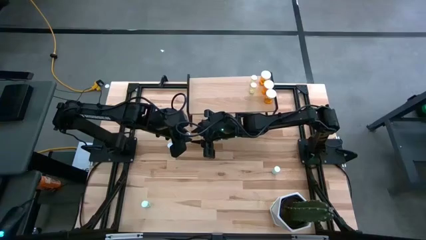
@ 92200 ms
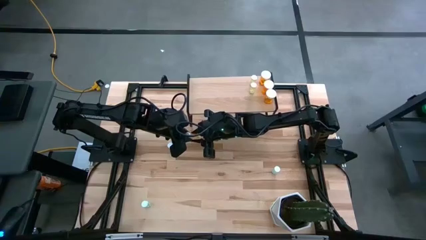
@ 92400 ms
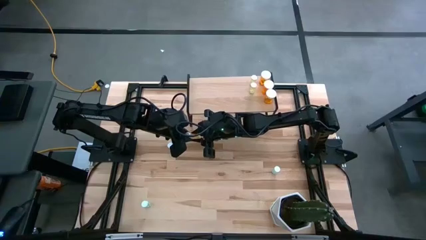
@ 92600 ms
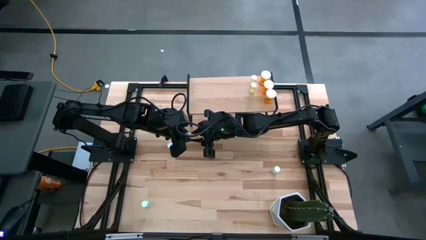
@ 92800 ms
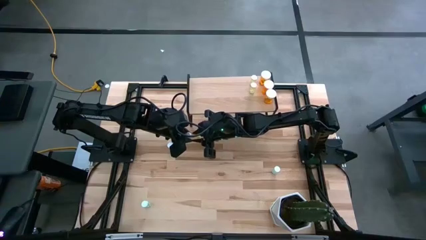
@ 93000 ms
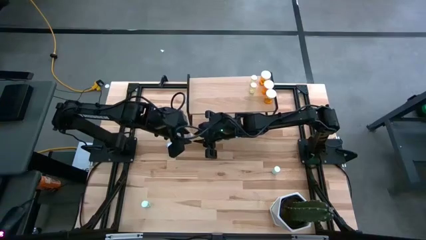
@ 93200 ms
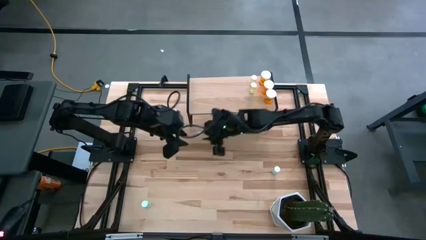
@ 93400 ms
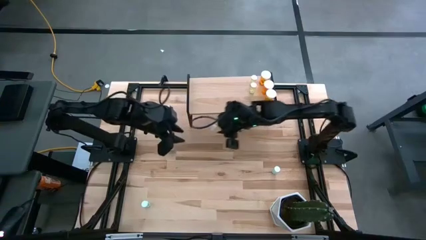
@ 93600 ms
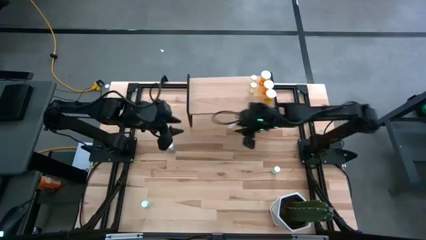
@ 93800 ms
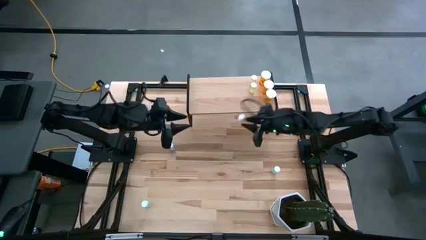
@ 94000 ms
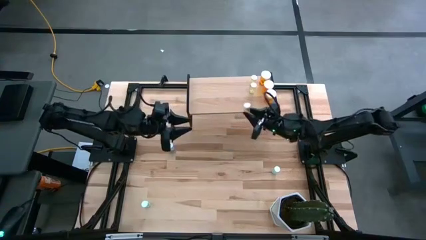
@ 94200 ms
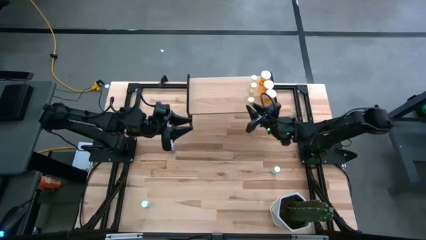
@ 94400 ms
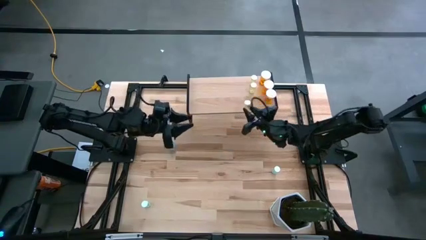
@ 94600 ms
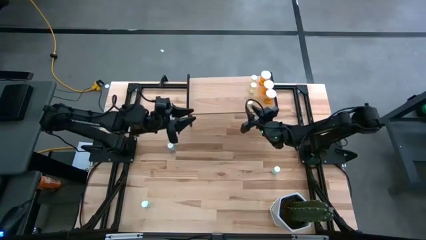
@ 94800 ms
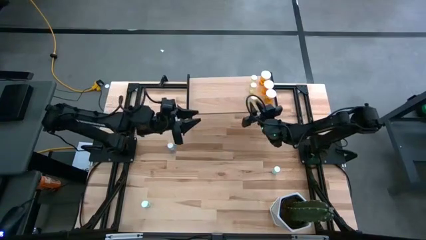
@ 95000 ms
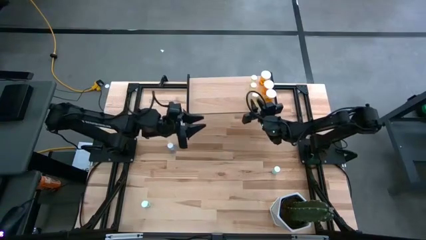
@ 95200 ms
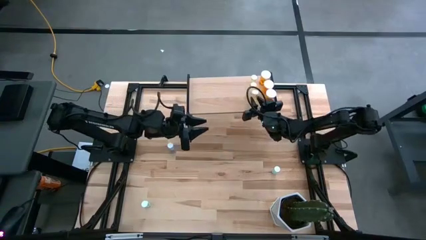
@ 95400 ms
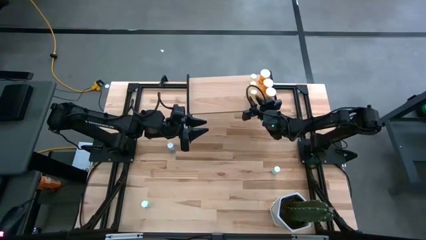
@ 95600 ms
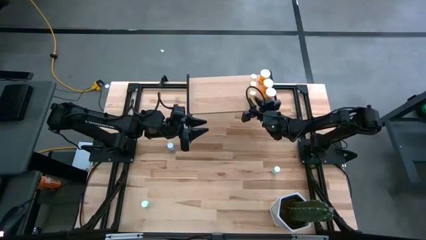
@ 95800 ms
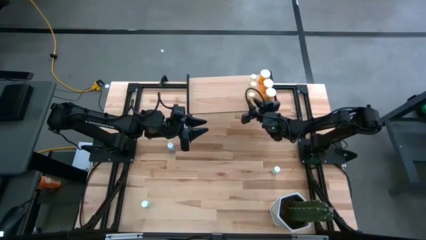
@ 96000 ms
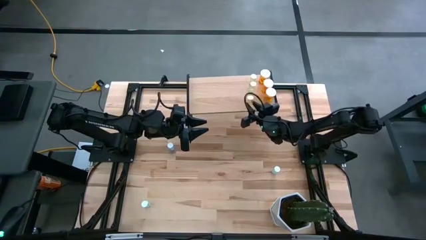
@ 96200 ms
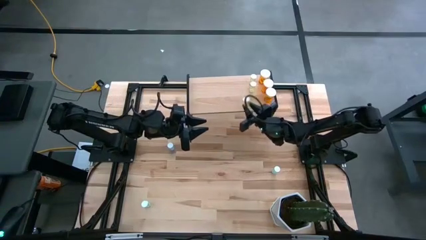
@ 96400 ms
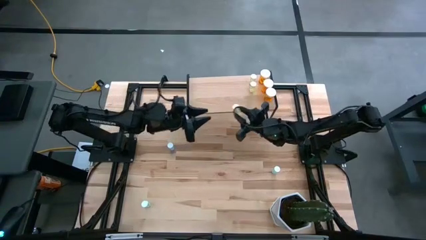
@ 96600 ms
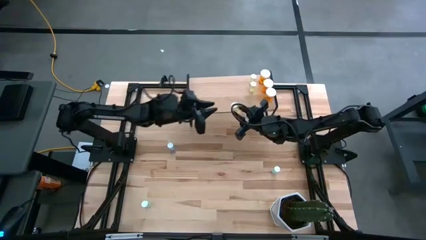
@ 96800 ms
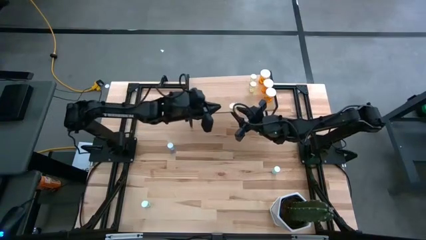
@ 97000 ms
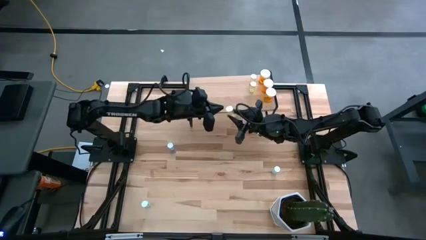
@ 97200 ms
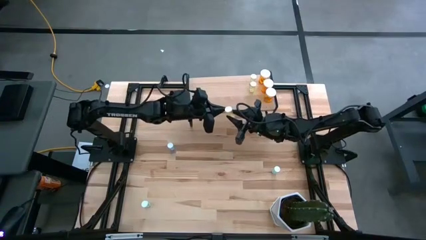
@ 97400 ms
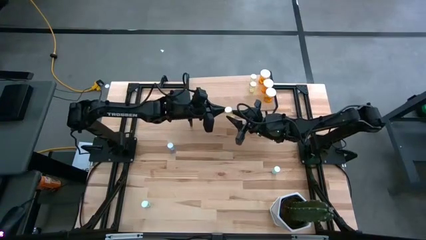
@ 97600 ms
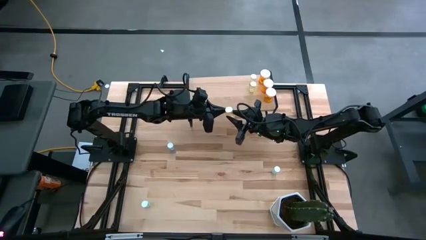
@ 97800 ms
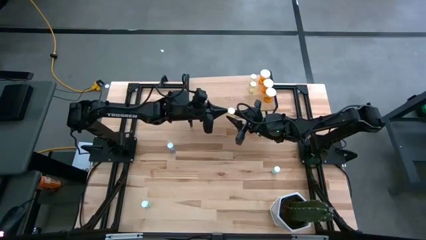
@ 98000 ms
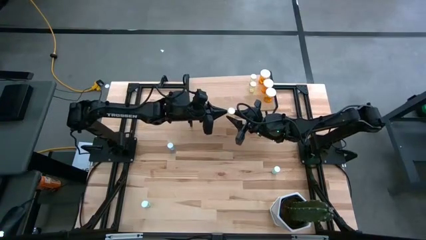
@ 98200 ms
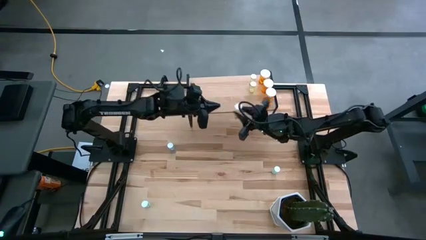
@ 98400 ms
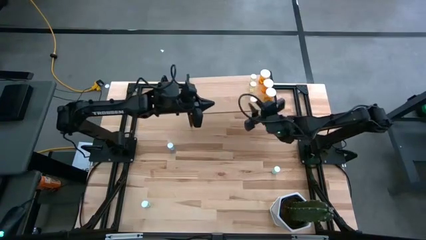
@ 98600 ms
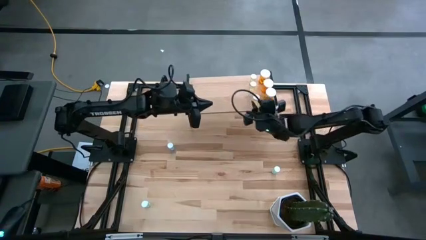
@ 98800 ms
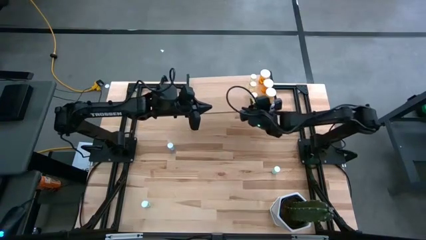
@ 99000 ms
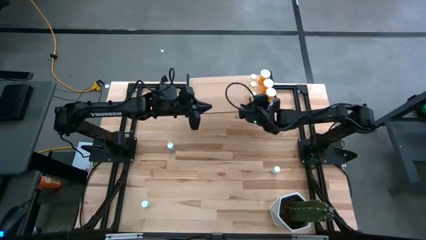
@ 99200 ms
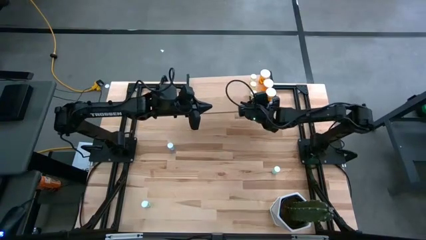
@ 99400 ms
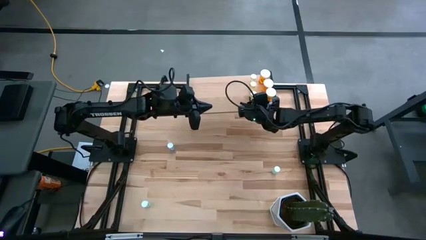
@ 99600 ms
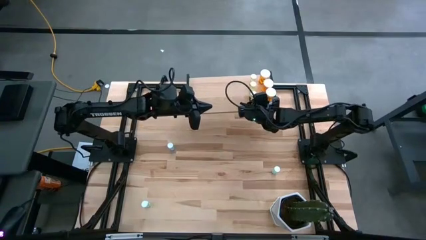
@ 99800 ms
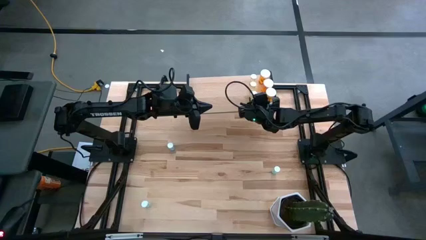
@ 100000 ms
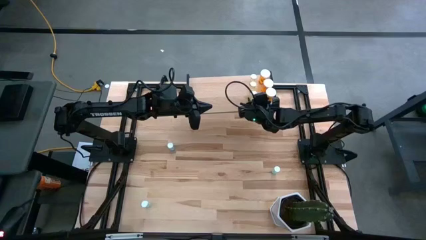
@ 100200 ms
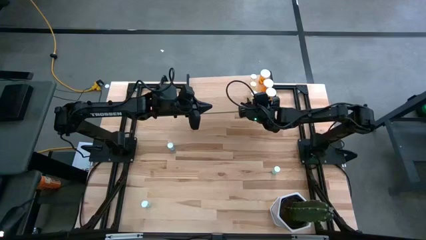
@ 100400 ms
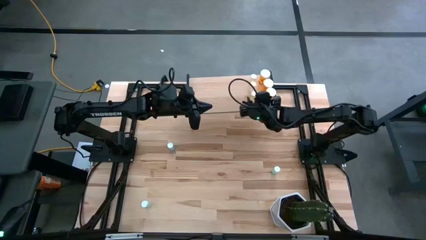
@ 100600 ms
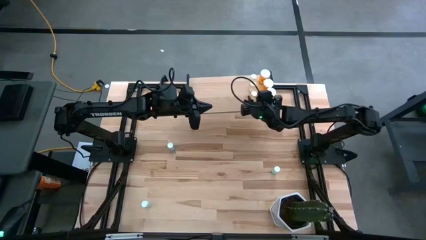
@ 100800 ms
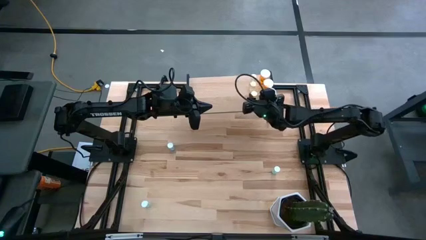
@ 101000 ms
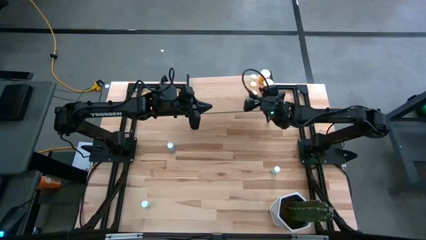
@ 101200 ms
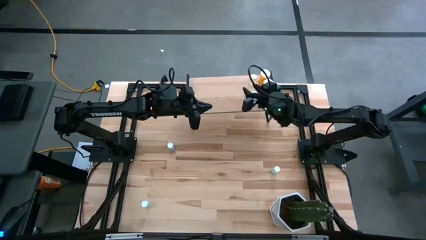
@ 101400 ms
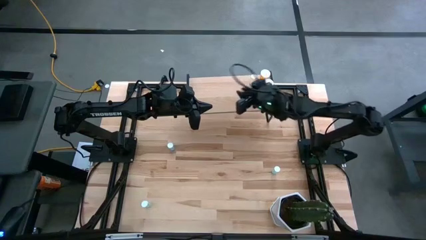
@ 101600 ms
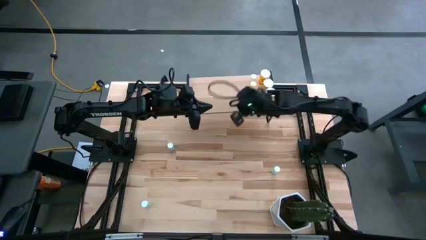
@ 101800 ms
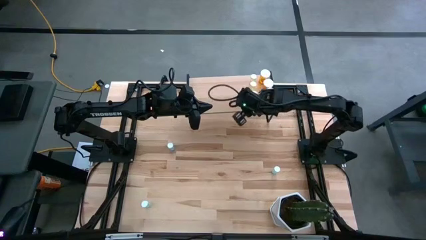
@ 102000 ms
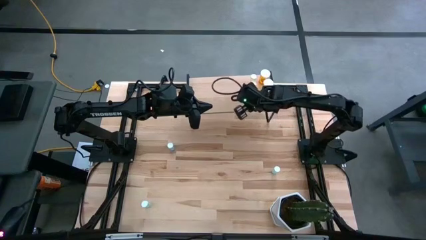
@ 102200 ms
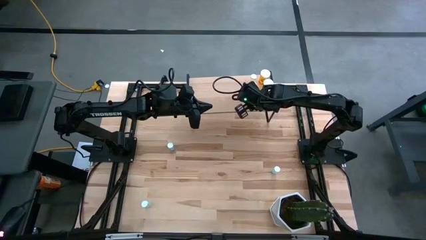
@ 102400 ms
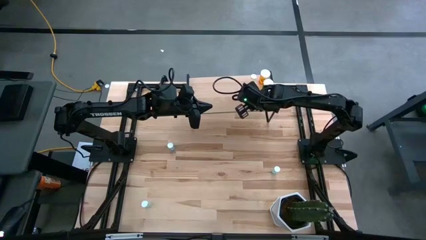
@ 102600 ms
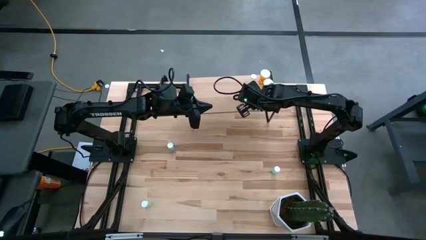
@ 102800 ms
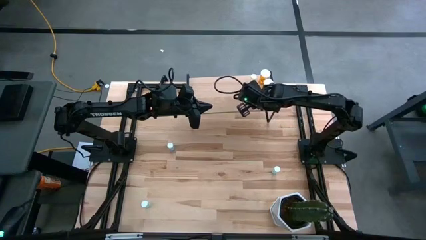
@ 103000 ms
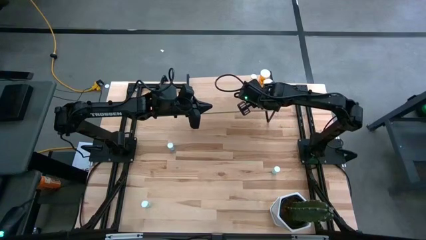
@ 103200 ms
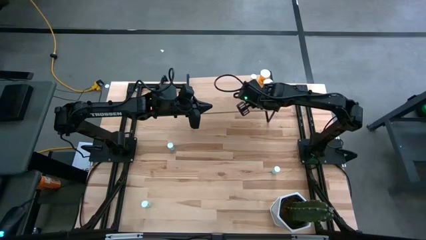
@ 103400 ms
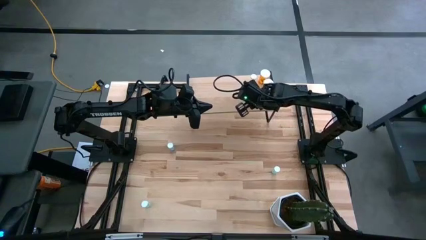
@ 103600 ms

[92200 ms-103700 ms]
Task: Pick and place medicine bottles onto shelf by color
Put the yellow pill bottle on the shelf aligned with the yellow pill bottle

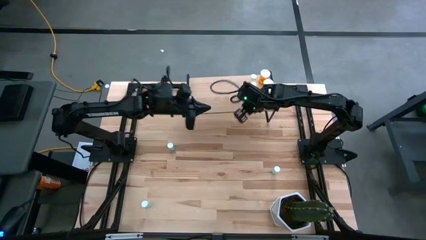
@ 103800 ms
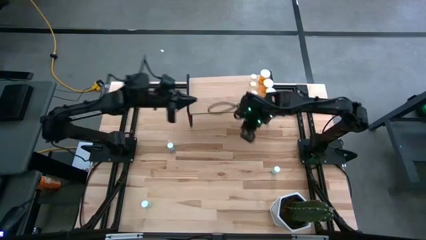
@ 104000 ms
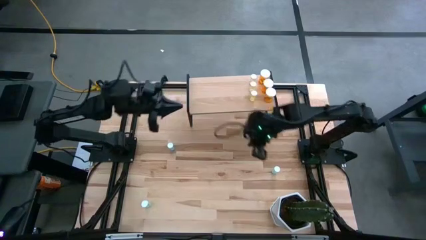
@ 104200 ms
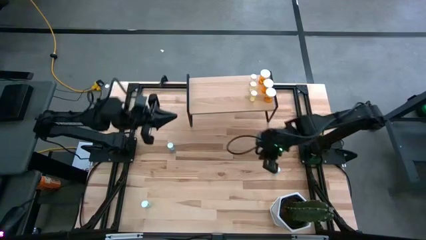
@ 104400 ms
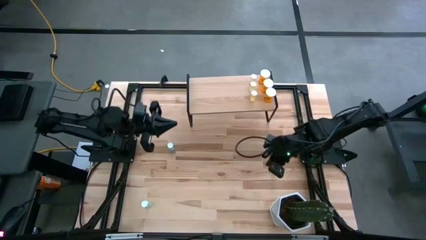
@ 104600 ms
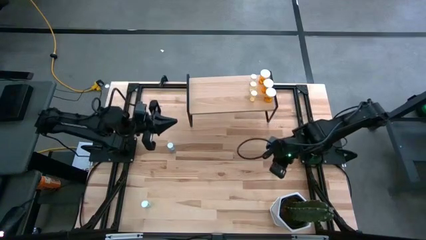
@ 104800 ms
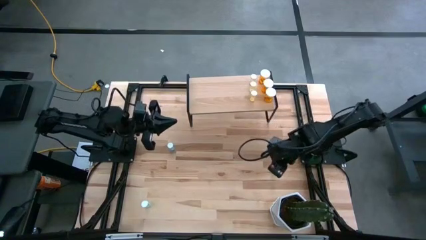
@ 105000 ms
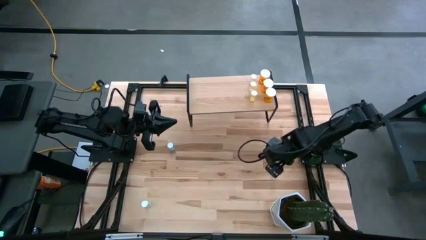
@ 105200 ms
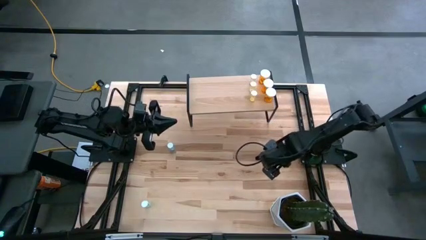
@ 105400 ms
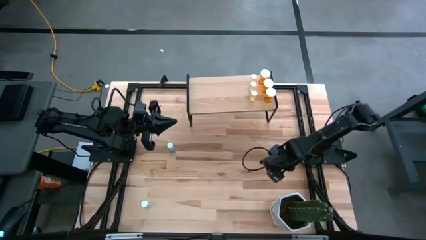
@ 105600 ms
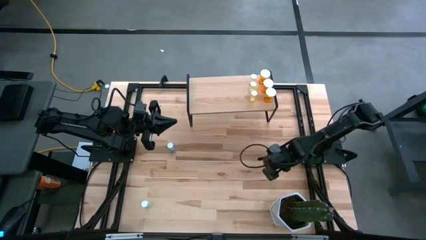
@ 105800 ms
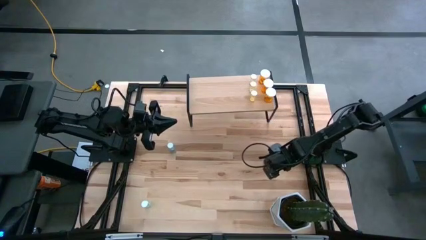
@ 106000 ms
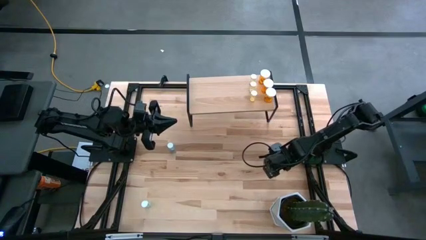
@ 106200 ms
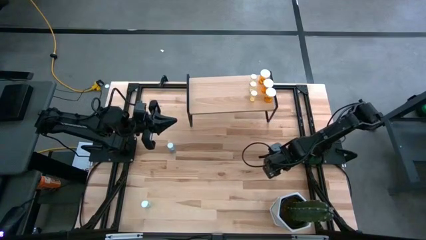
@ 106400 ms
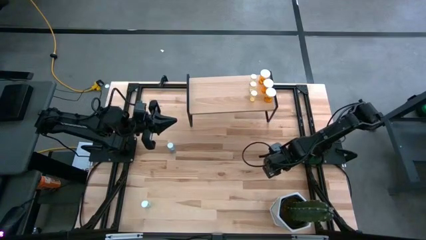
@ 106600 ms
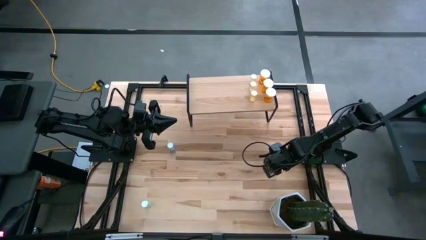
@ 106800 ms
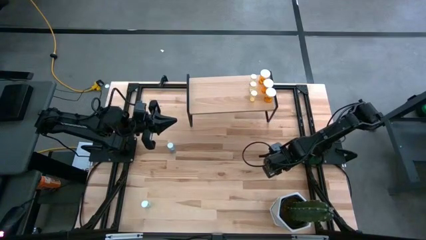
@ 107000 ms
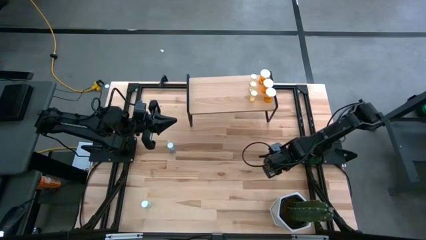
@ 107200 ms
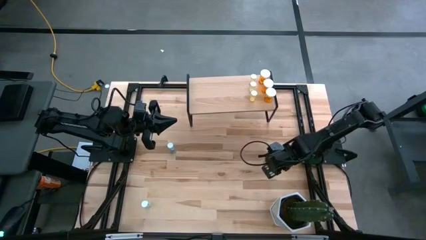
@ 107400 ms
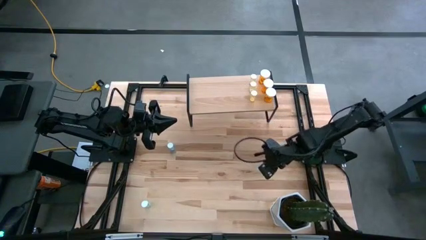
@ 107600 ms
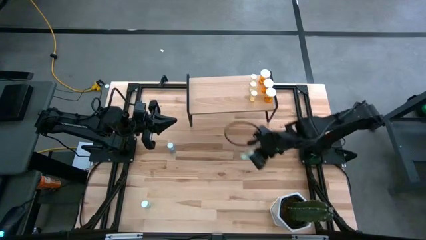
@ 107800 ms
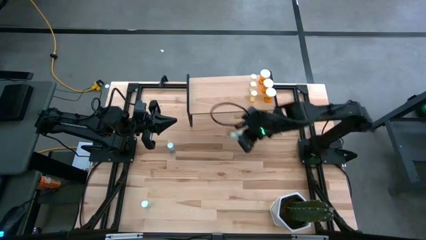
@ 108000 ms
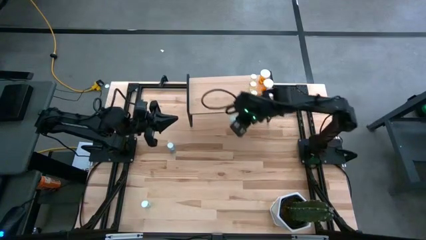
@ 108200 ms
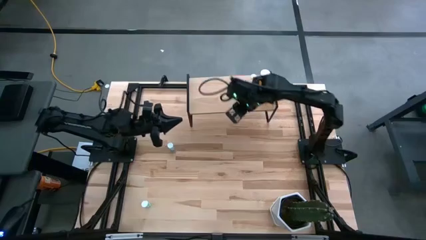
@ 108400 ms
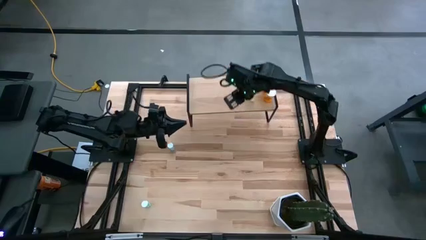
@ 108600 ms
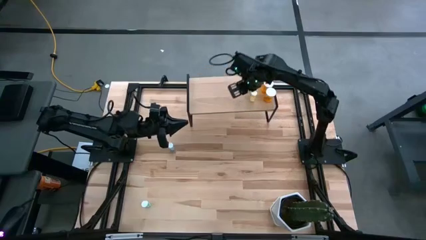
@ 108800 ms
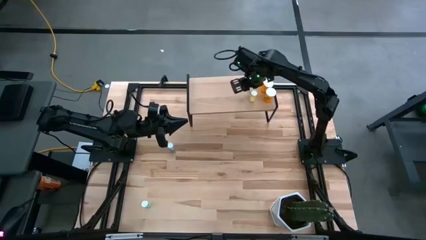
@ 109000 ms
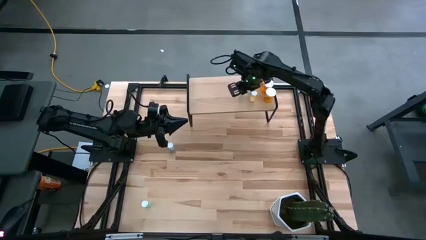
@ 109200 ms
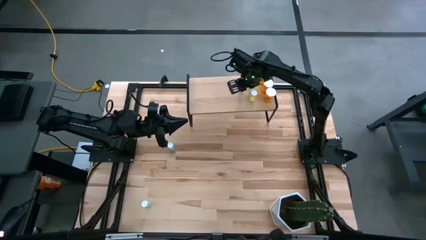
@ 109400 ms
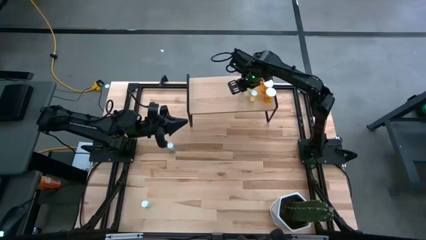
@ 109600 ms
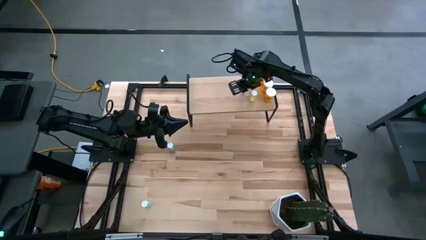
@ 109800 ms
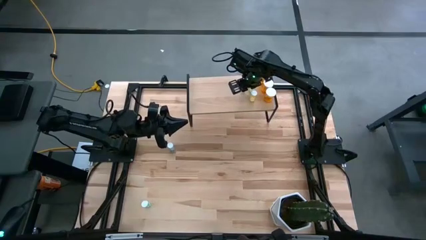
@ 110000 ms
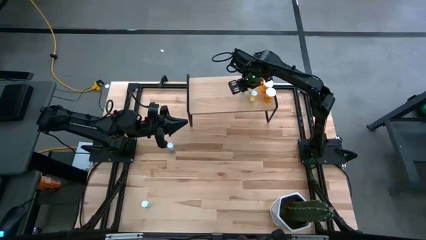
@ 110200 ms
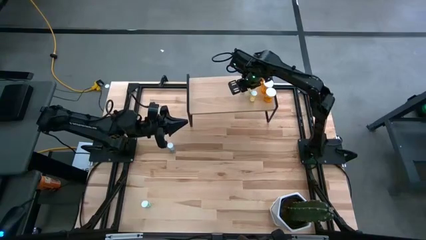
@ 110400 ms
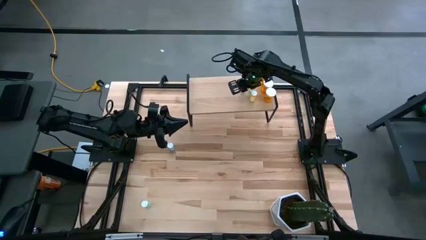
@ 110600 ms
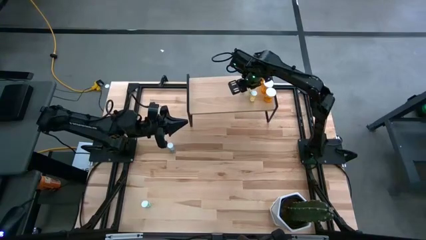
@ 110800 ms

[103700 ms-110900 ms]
Put the right green pill bottle on the shelf
